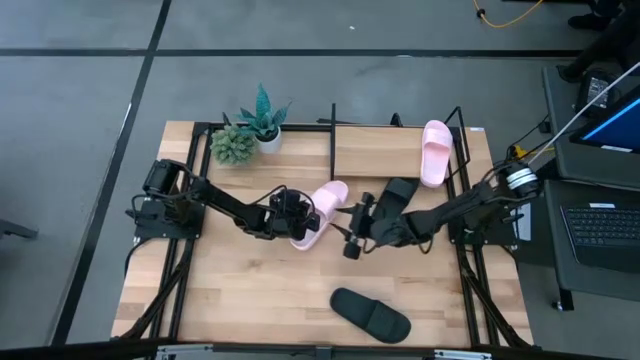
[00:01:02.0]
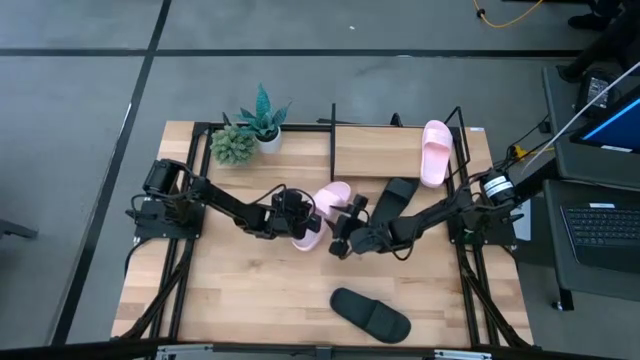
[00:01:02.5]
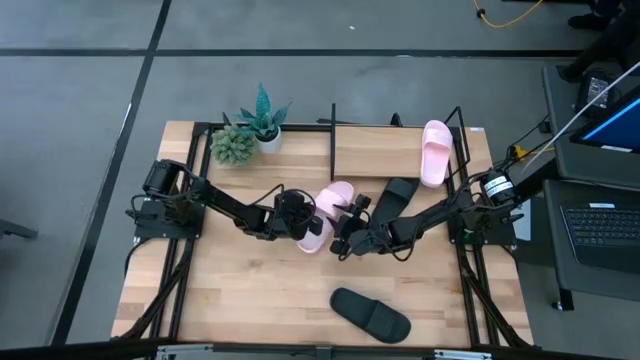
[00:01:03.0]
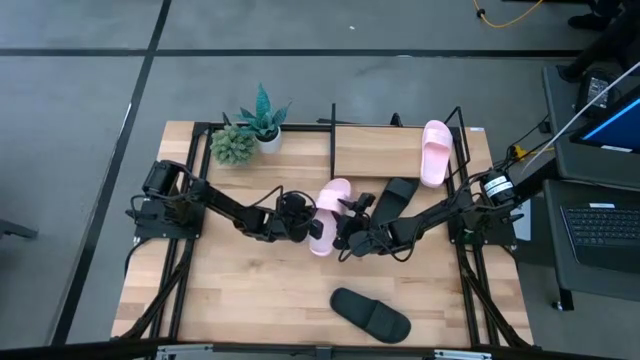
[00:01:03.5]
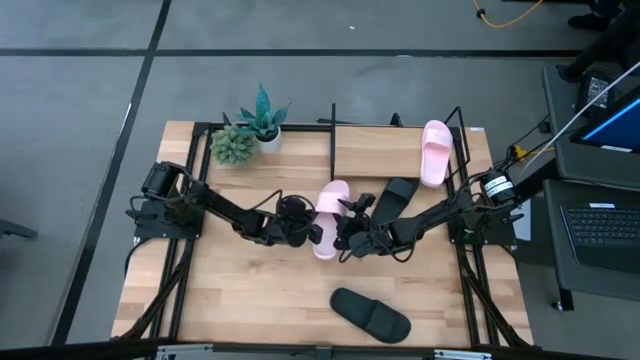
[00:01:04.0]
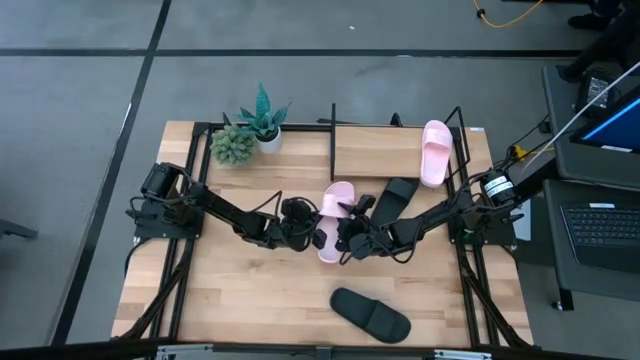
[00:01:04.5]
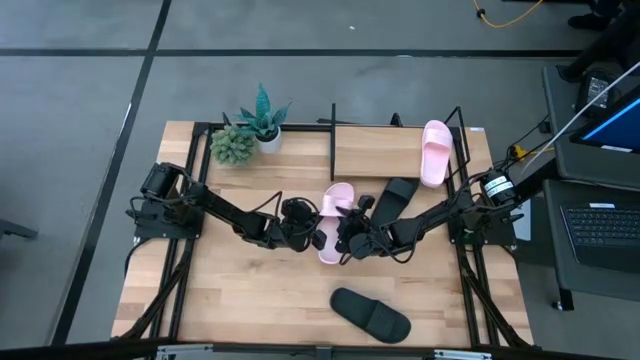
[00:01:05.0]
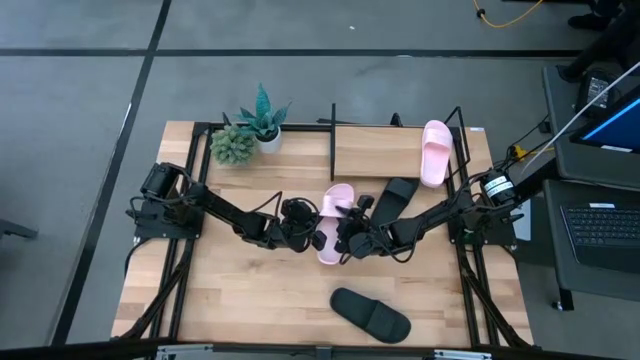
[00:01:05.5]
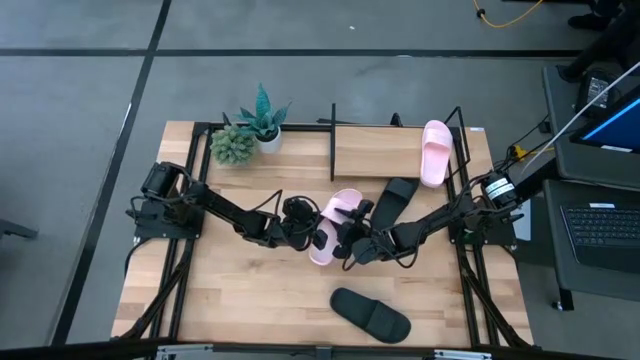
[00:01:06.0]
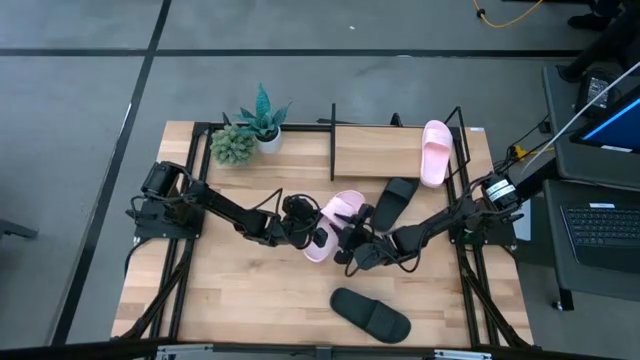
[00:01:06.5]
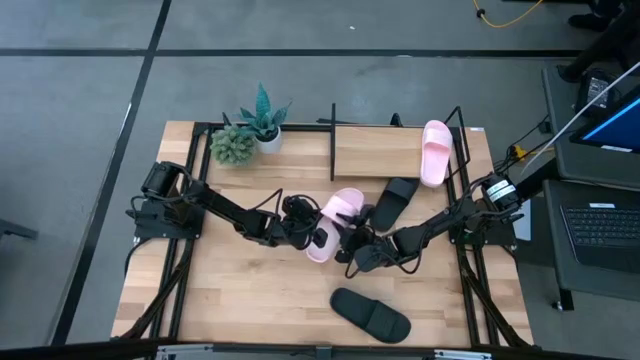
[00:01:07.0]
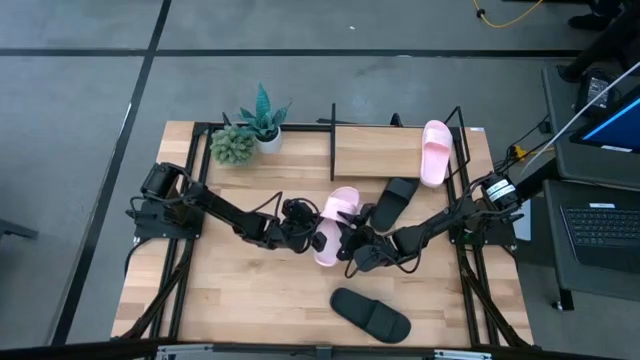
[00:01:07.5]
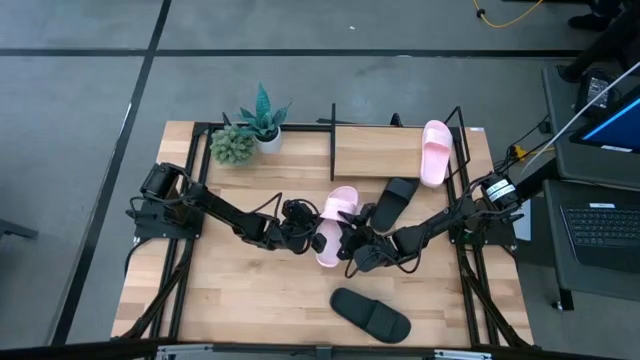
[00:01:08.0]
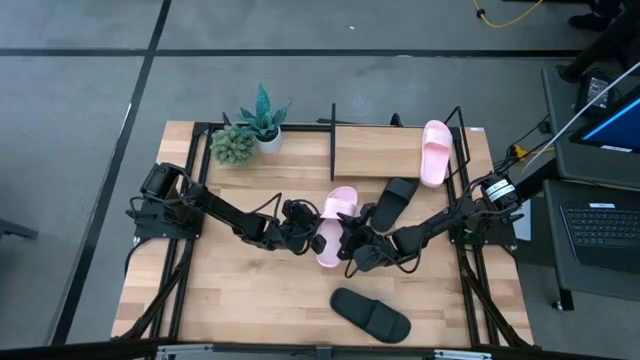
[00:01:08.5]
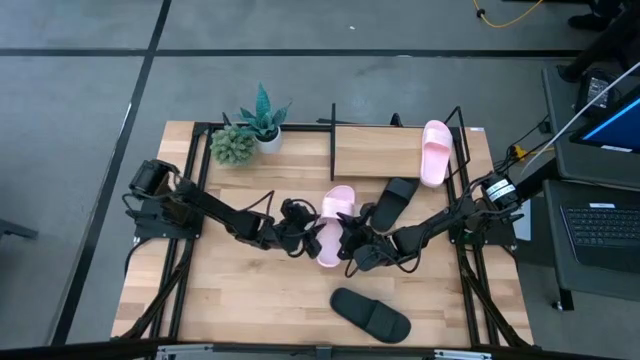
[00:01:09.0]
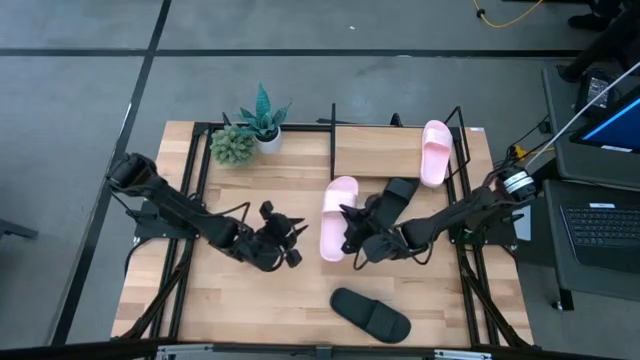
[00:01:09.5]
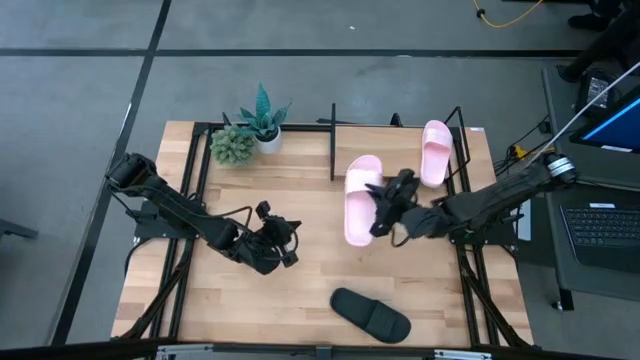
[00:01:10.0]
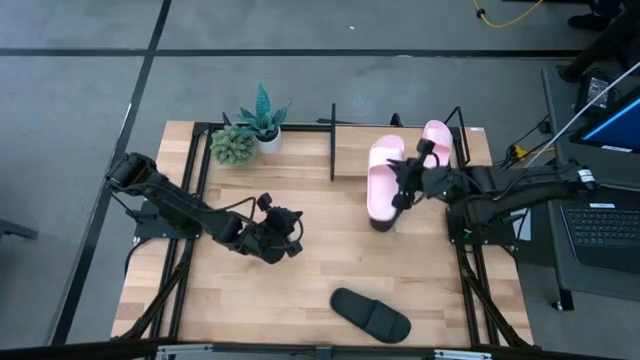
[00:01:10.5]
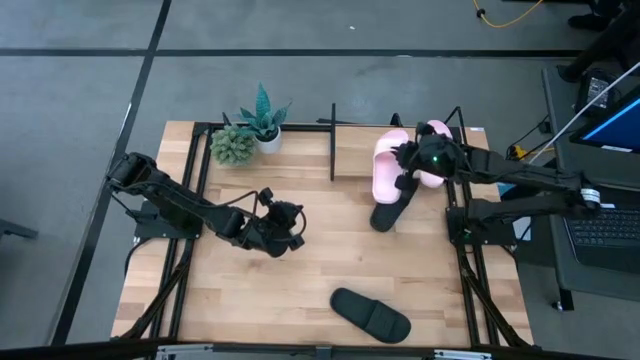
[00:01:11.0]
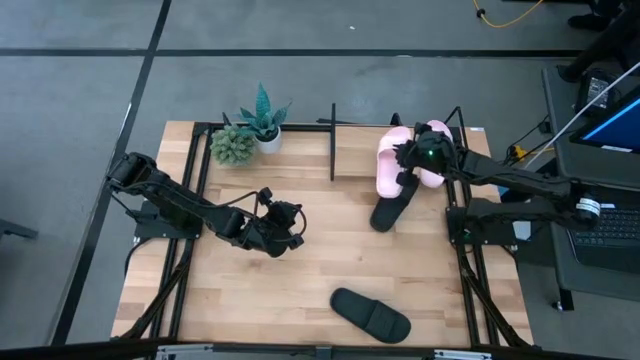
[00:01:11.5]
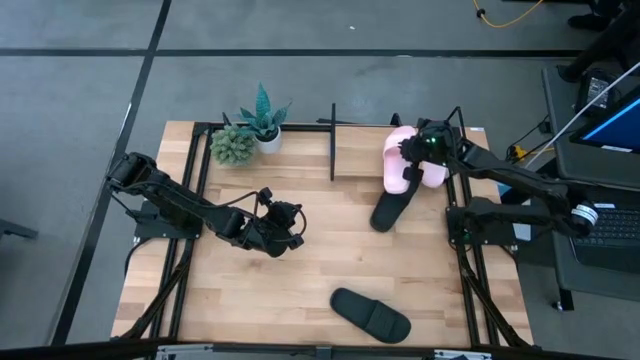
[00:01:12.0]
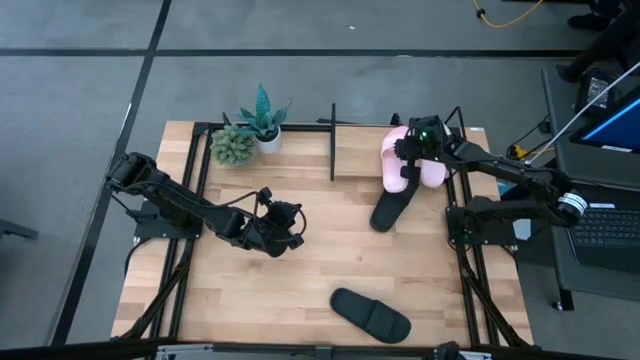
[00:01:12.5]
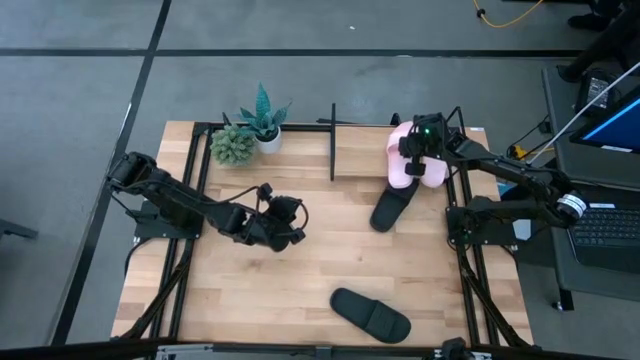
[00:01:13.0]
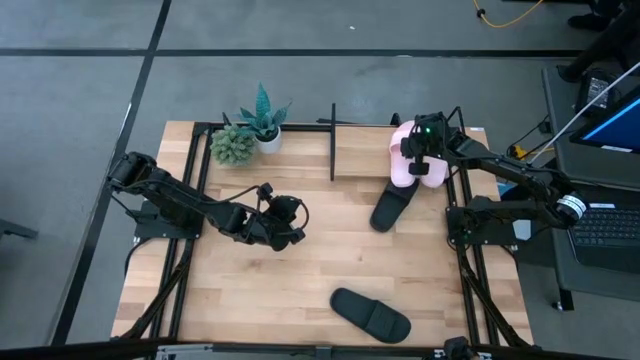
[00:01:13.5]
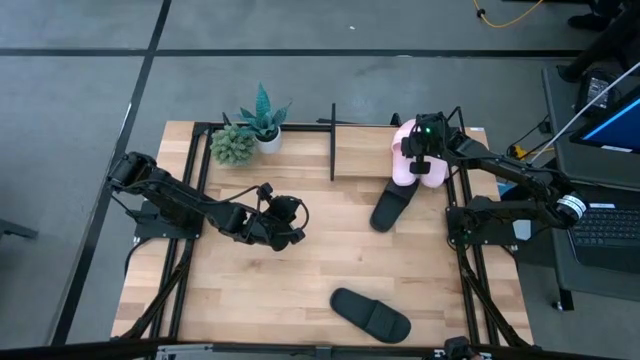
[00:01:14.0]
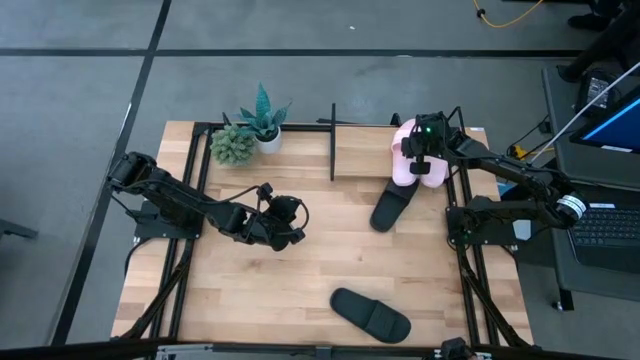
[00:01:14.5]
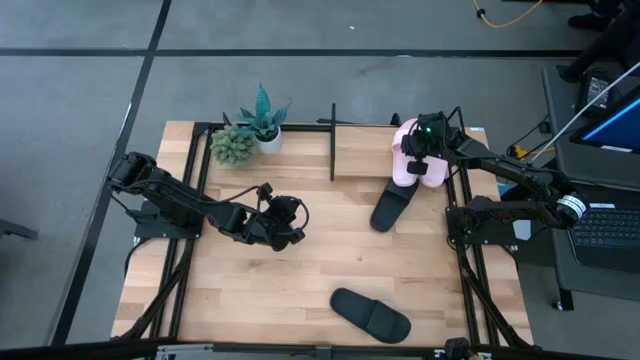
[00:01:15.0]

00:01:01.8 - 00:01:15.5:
Task: Pick and place slides into the shelf
Put the pink slide on the shelf
